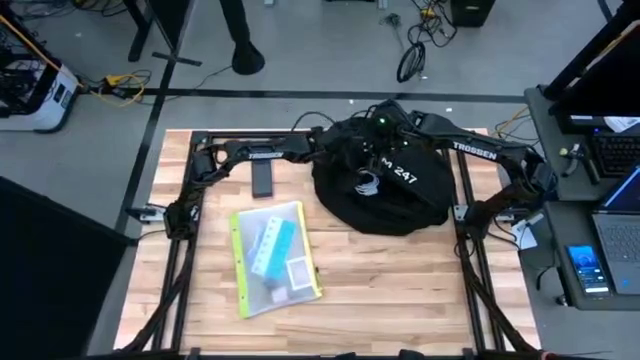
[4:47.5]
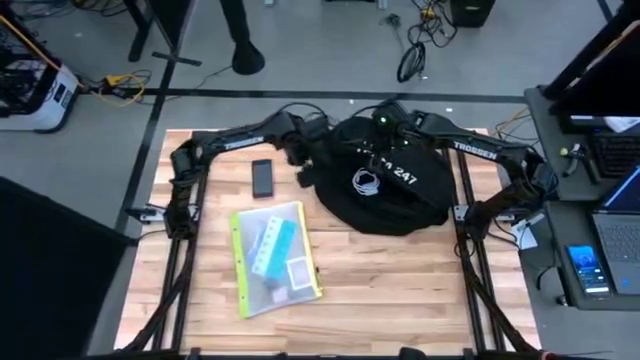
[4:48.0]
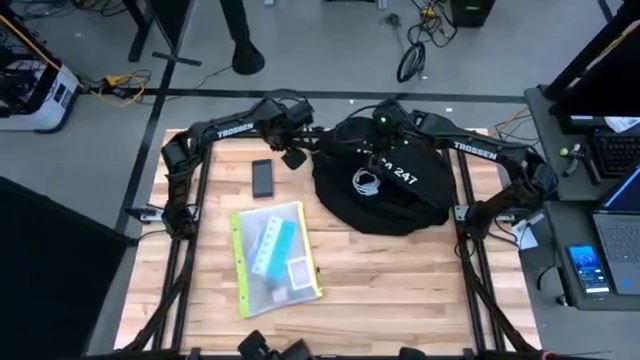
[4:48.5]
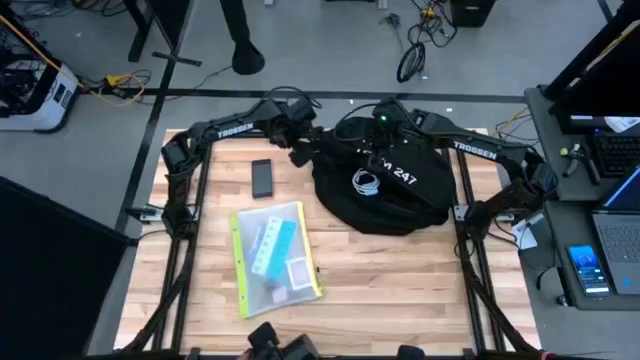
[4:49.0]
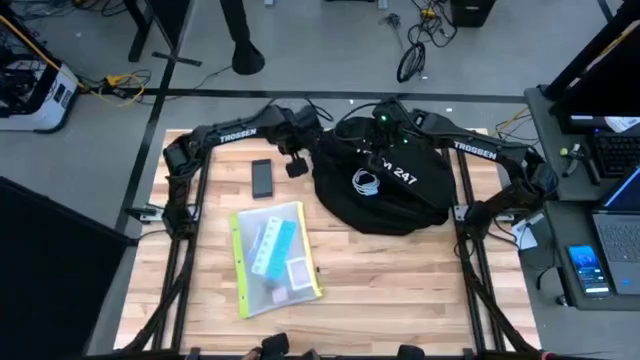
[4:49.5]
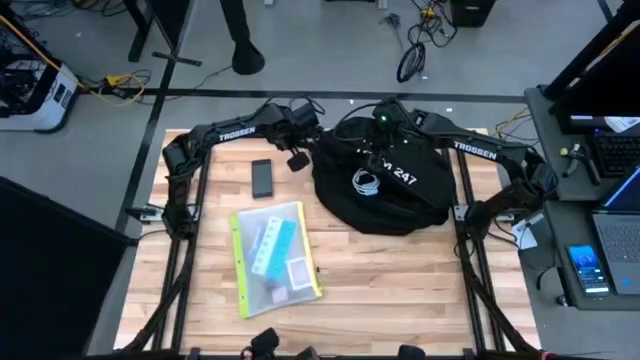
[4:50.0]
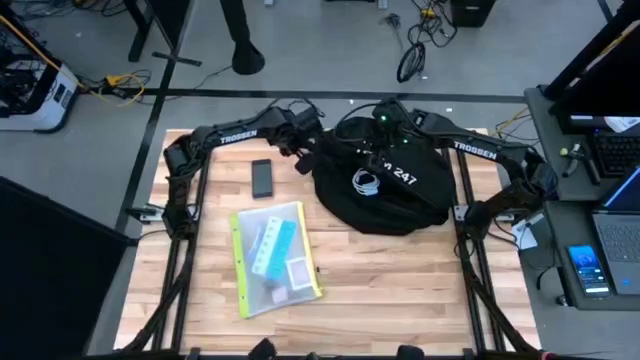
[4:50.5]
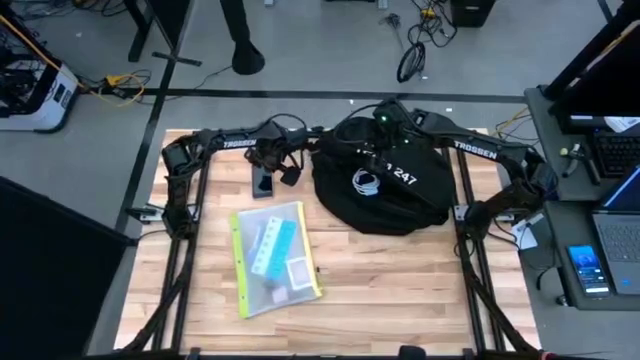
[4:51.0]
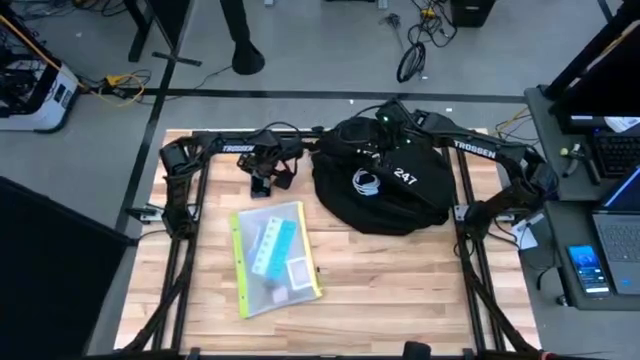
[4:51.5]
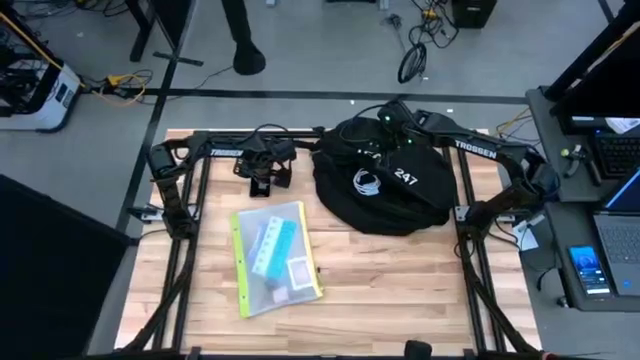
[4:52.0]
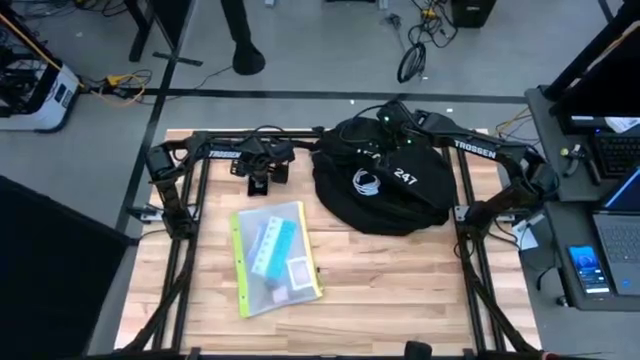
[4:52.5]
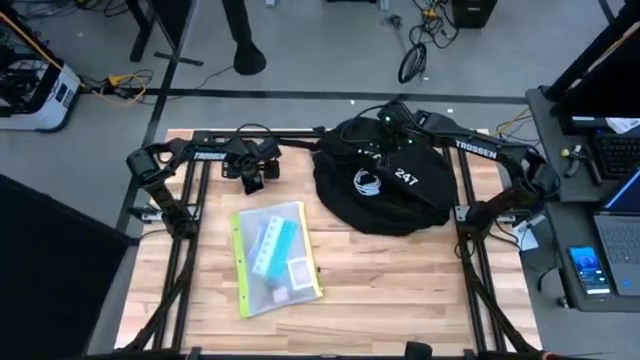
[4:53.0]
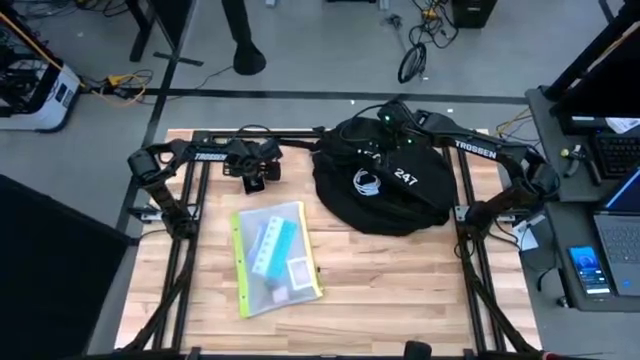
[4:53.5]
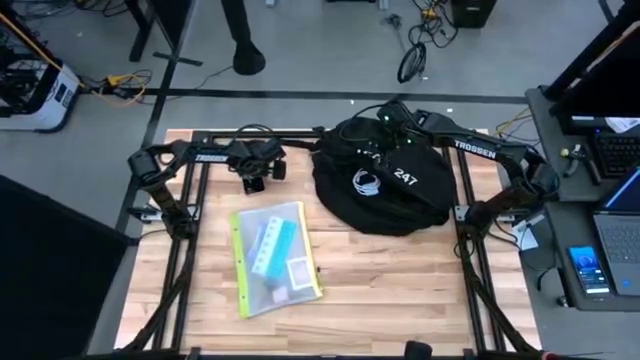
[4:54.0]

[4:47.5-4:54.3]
Task: Unpack backpack
Put the cellphone into the black backpack

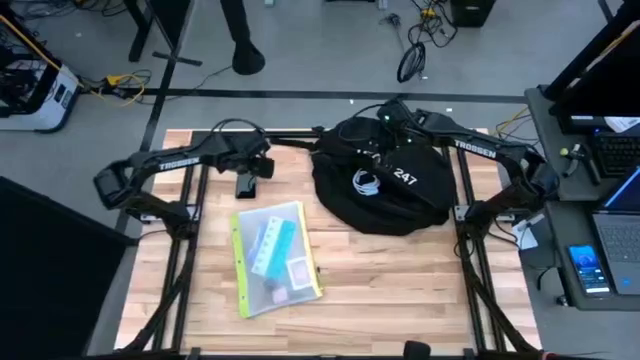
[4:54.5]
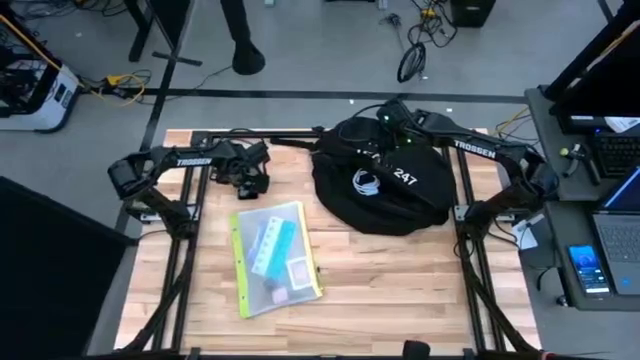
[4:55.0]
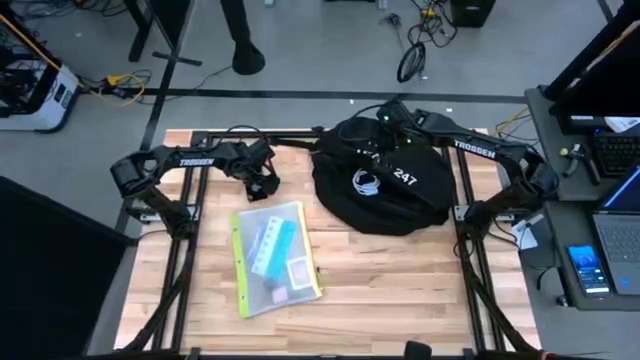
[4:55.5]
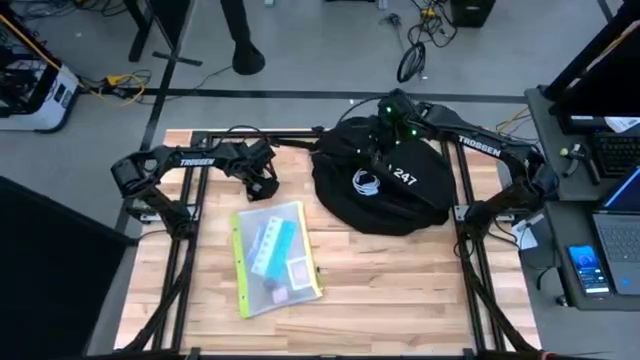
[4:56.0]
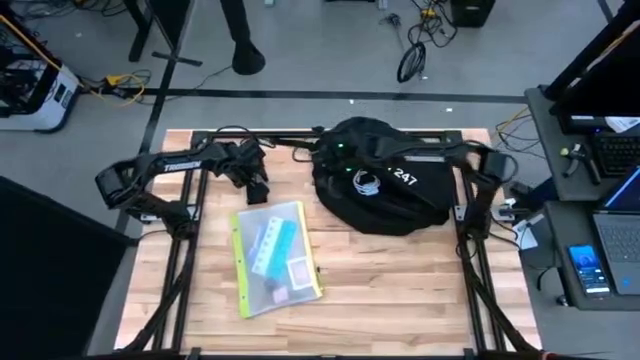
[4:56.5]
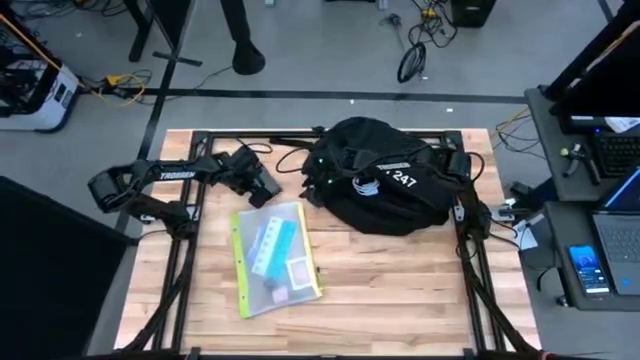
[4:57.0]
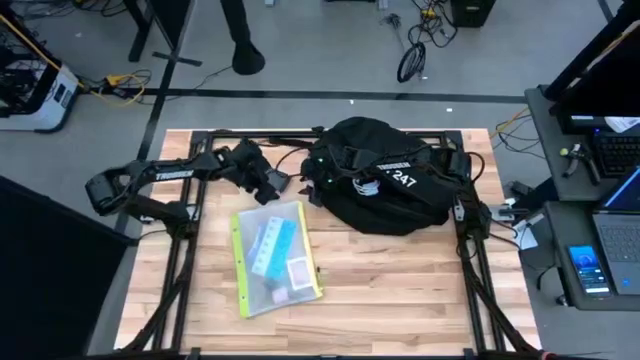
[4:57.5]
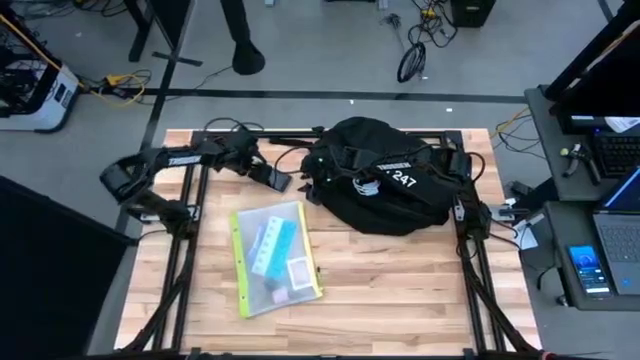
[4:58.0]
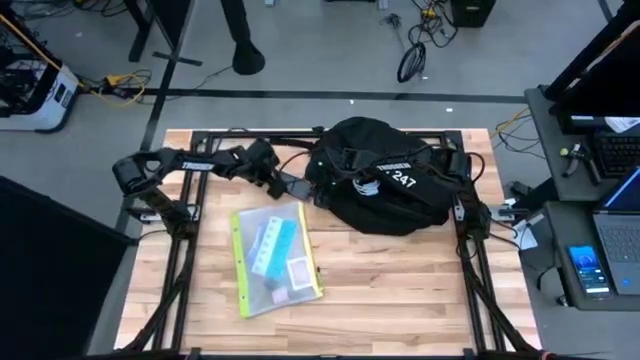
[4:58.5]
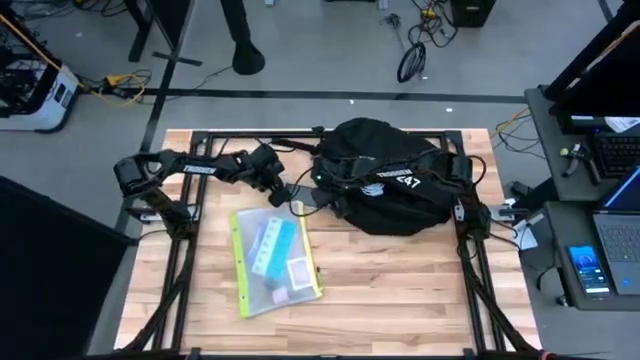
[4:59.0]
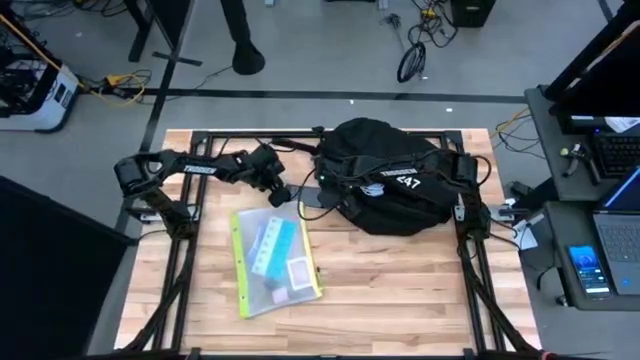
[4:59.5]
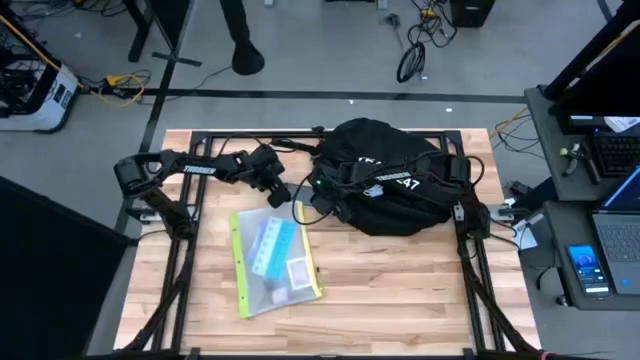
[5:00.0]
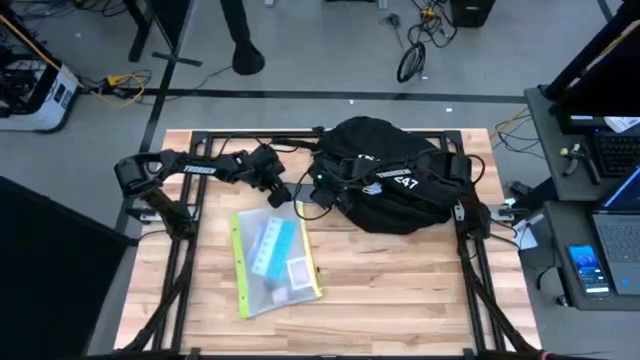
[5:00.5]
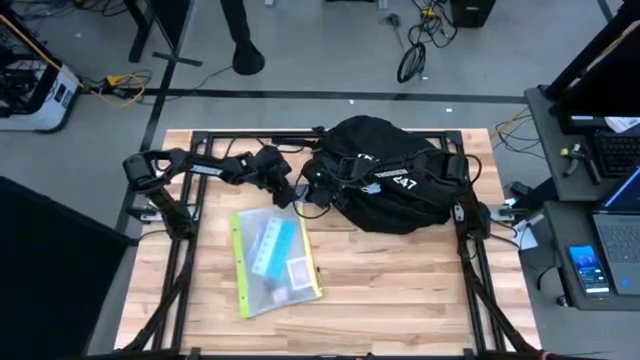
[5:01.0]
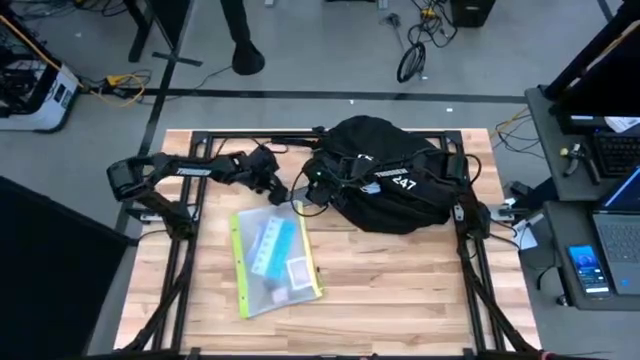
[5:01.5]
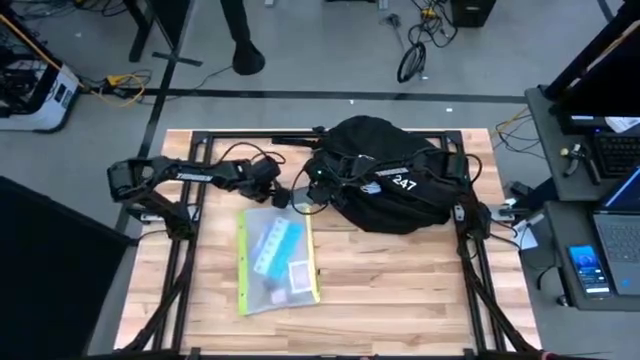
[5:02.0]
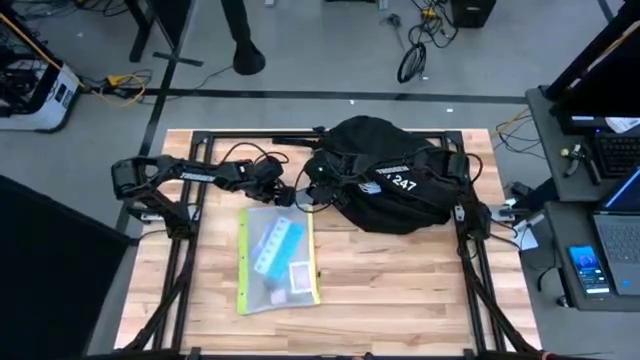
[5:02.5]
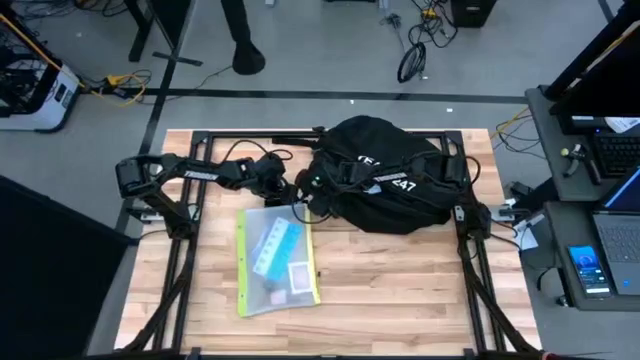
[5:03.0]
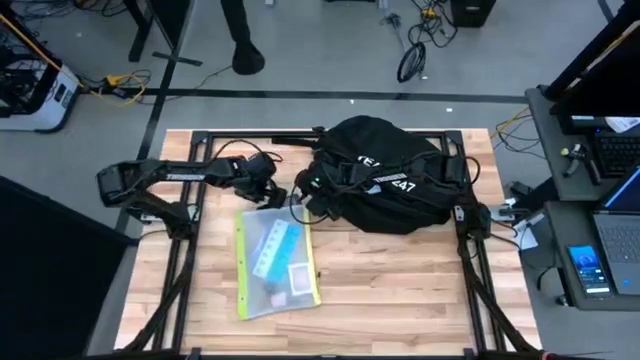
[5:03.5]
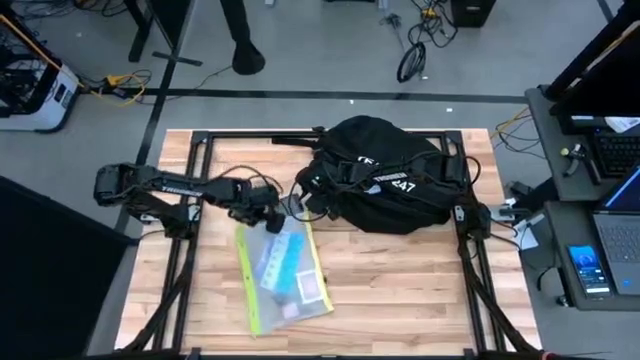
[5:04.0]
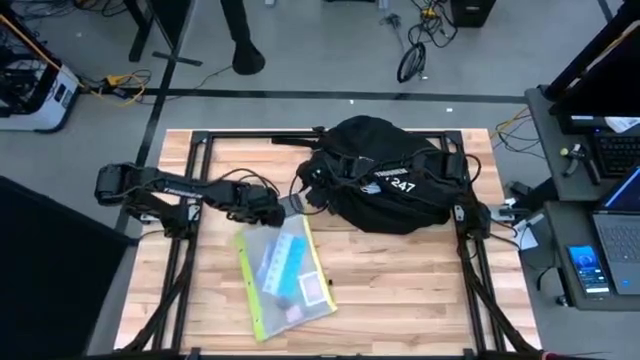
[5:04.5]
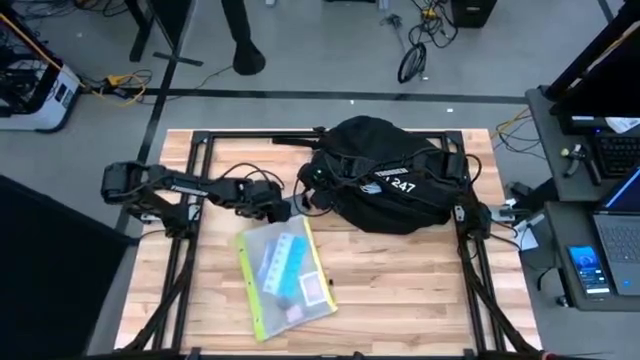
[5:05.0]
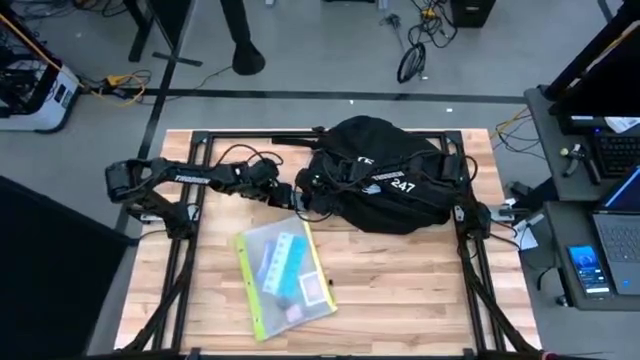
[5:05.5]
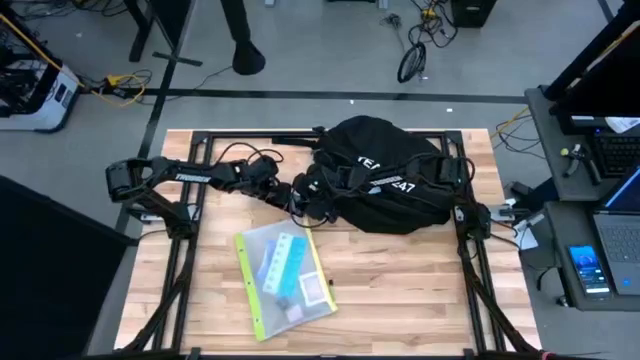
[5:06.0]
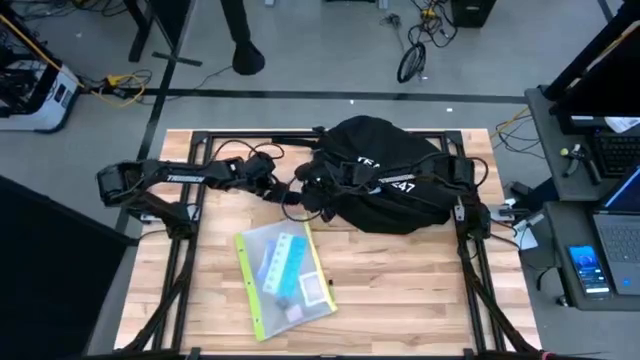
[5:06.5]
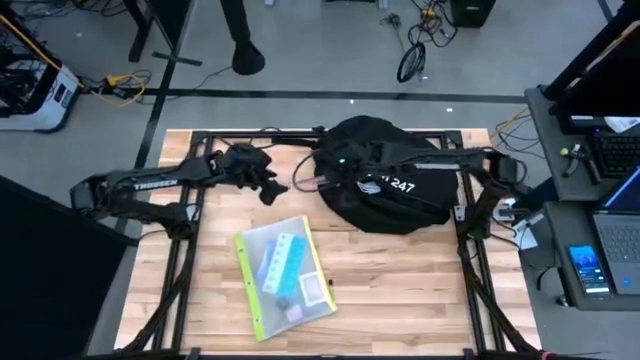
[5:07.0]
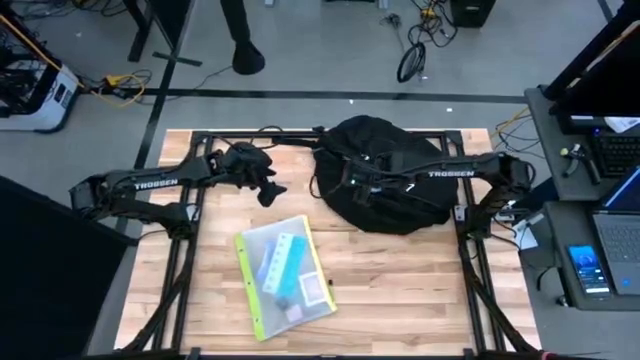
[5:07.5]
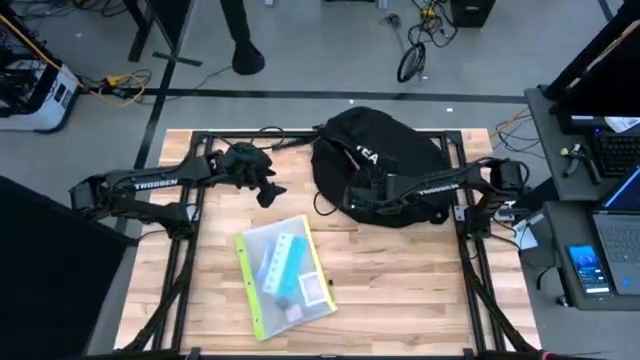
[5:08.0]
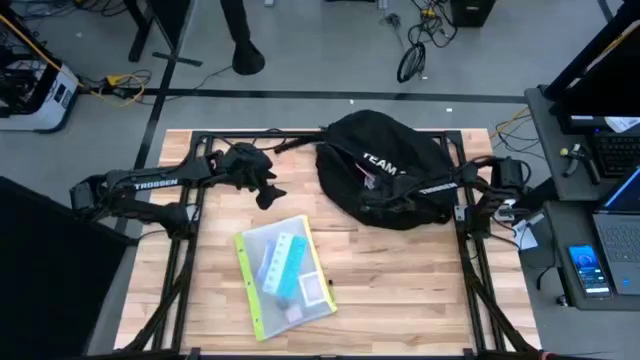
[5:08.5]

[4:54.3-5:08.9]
Put the cellphone into the black backpack
